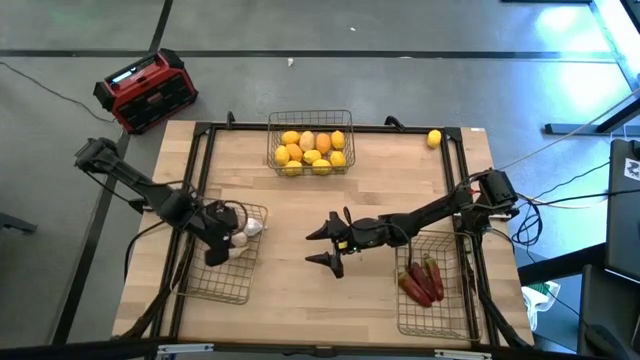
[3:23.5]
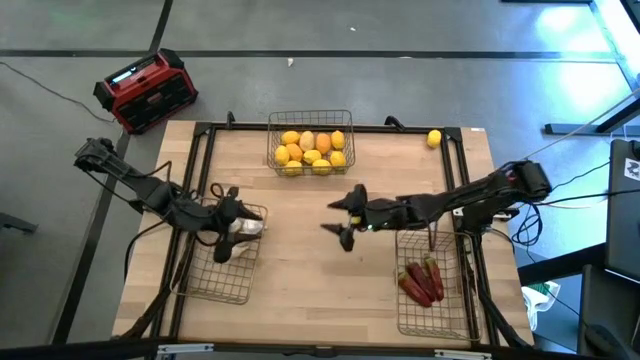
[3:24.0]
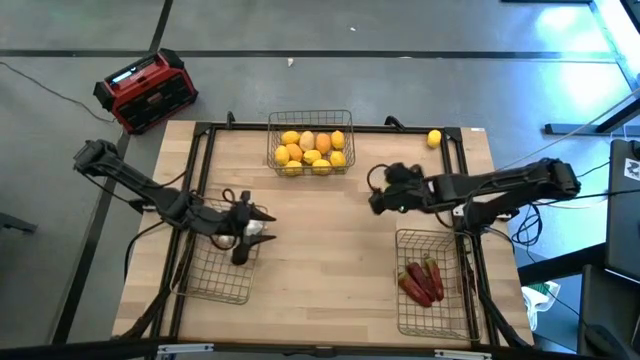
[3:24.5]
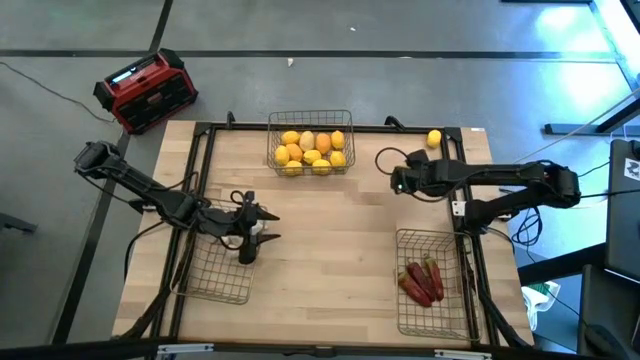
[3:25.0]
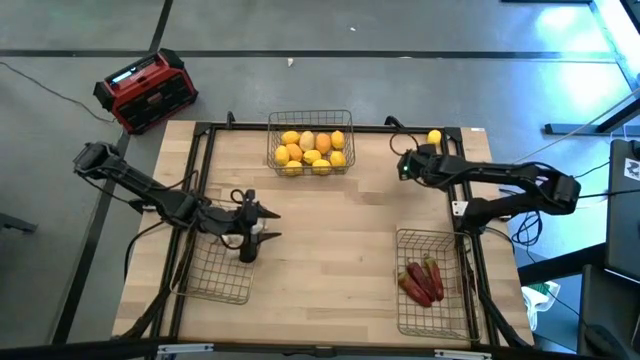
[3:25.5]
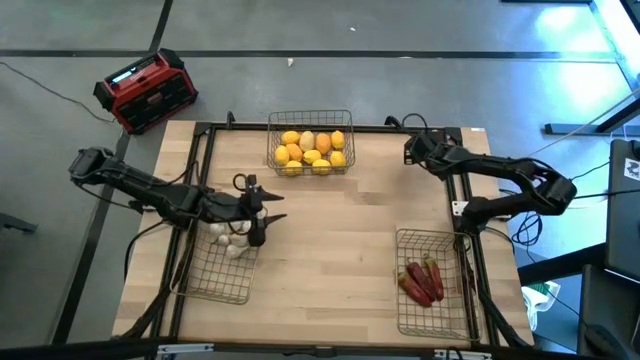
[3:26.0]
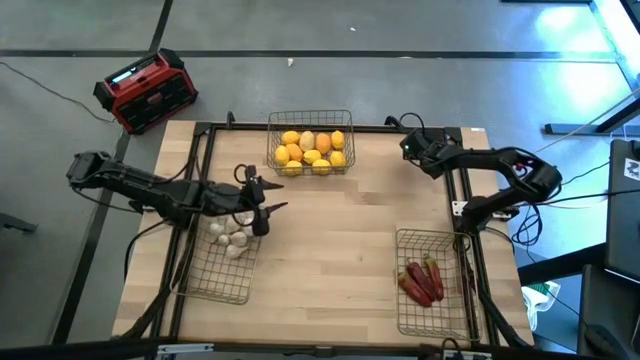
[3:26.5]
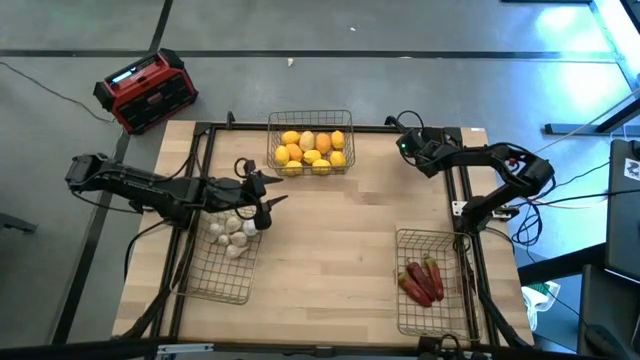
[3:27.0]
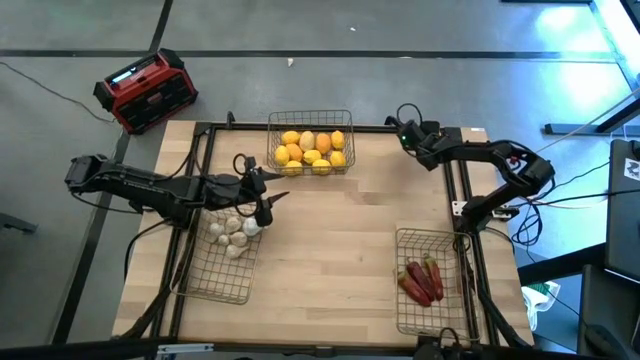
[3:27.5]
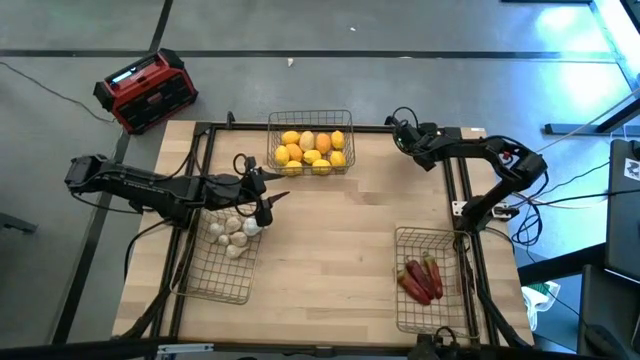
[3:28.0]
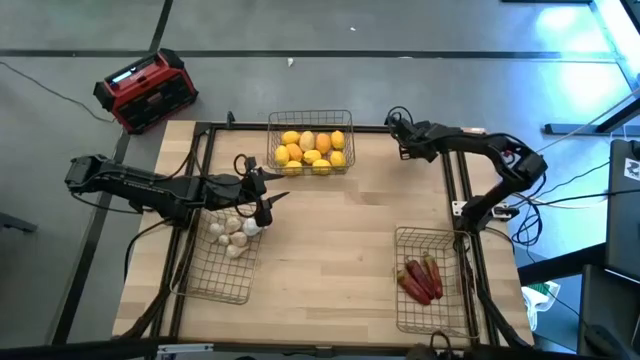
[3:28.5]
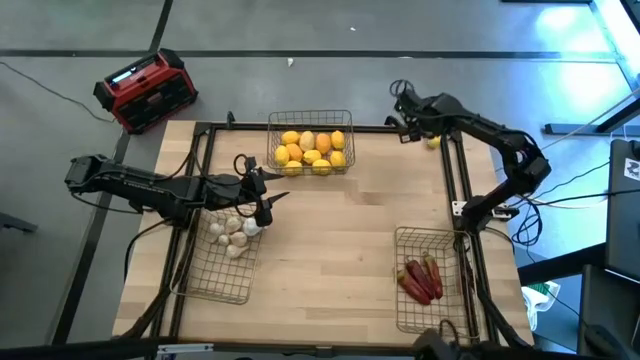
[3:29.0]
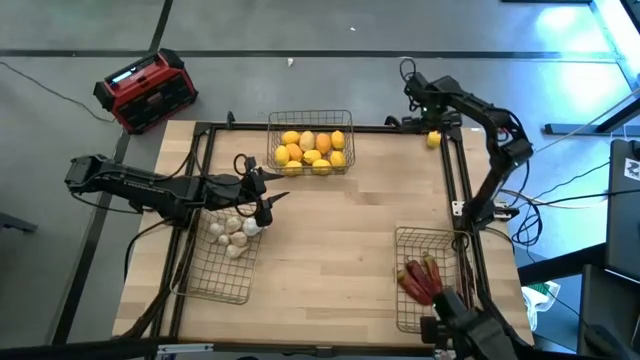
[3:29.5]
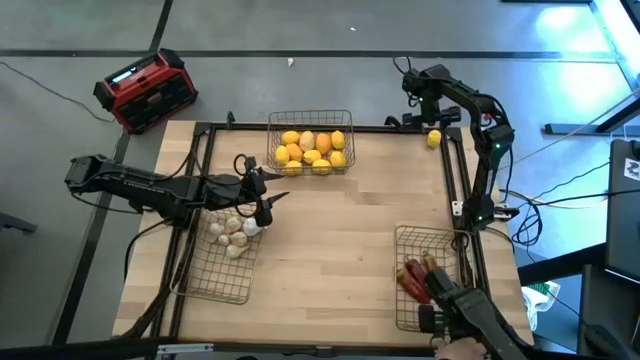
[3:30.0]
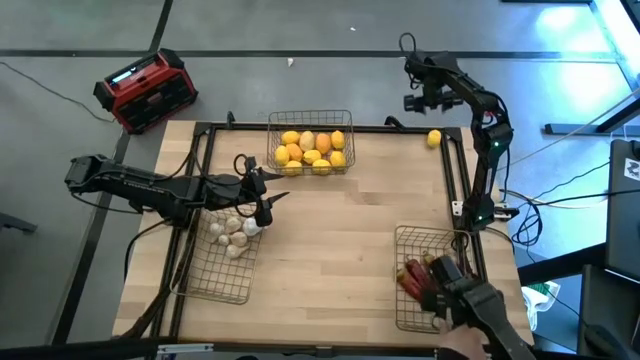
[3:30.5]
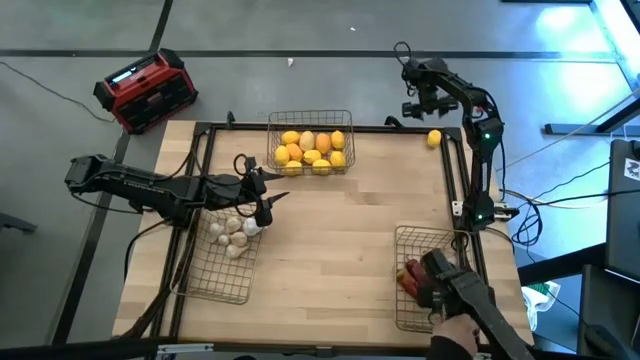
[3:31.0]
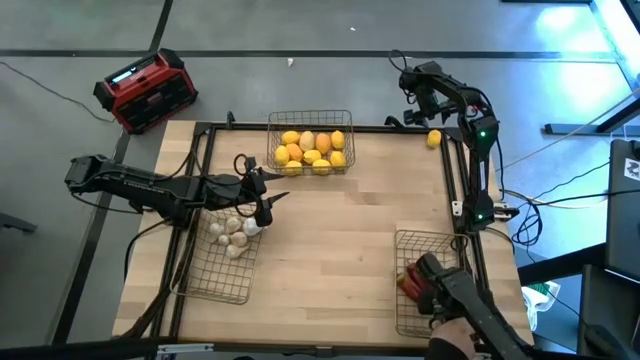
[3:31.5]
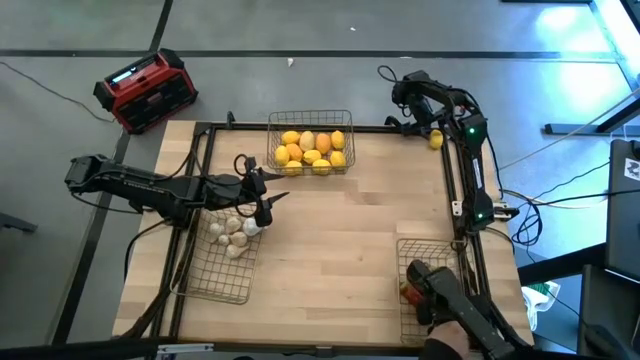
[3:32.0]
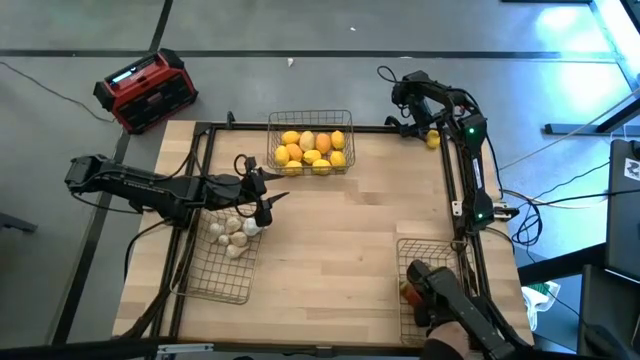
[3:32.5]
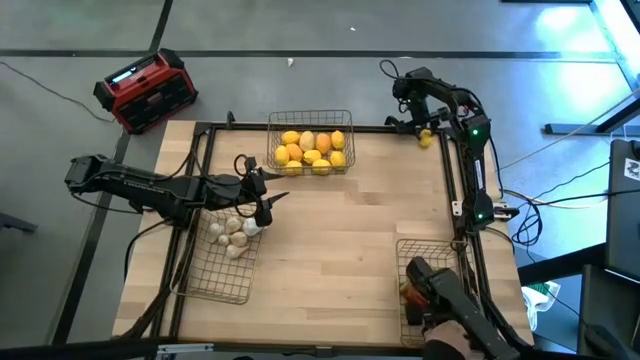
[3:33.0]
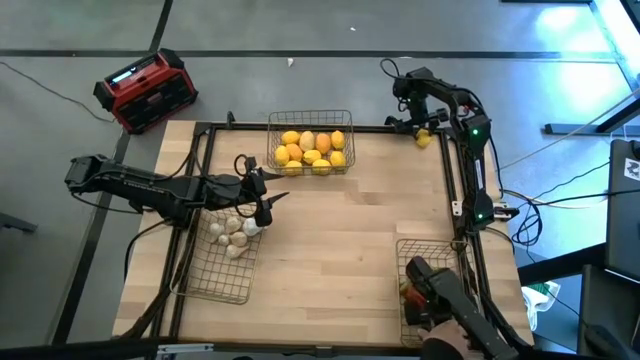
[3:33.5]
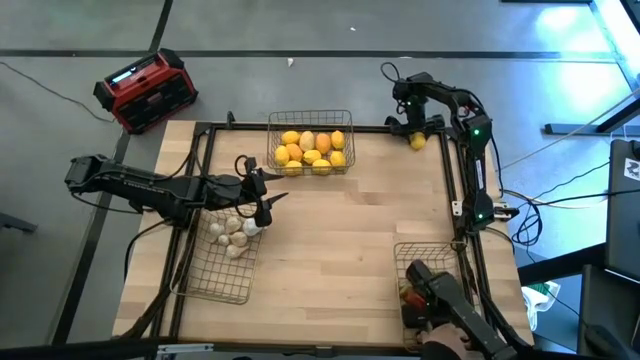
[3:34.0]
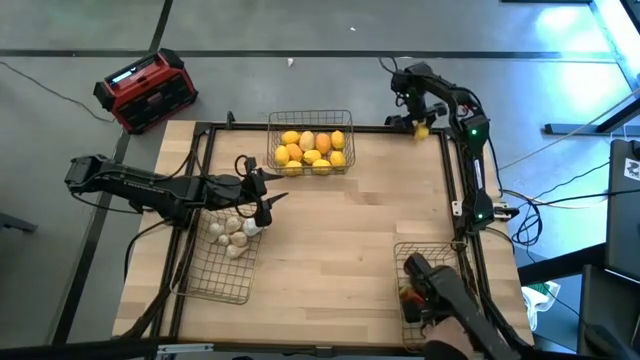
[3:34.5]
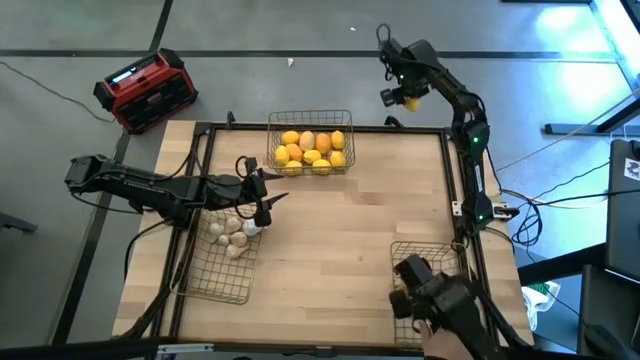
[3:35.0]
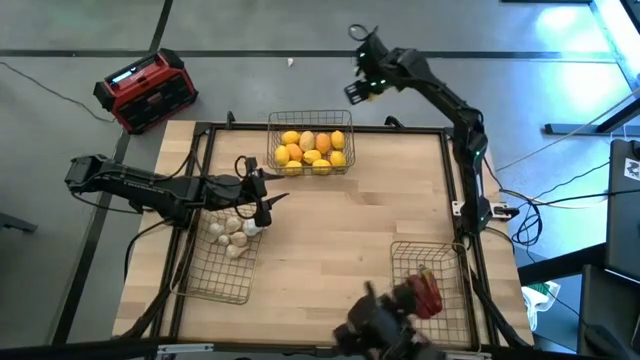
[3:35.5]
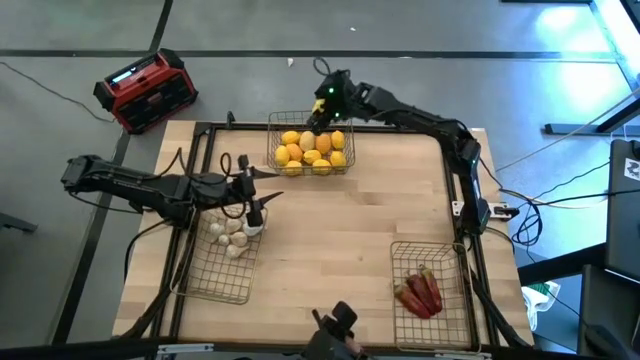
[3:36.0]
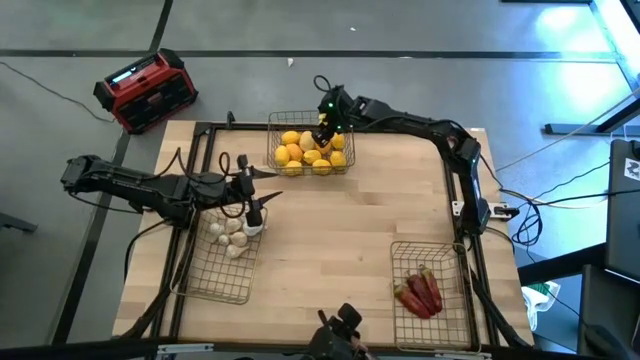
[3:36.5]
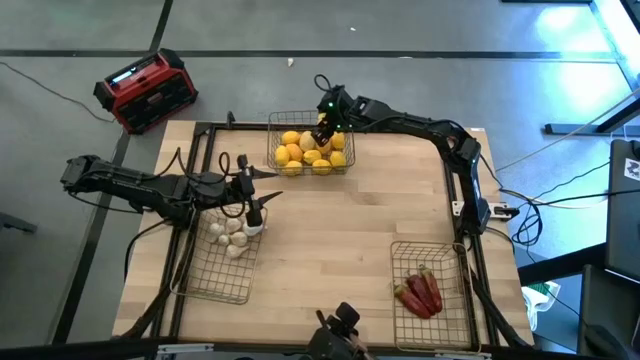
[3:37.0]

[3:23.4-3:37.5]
Task: Sort produce into baskets
Put the lemon into the top wire basket

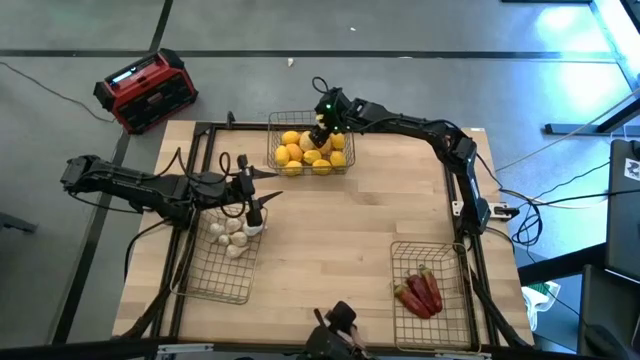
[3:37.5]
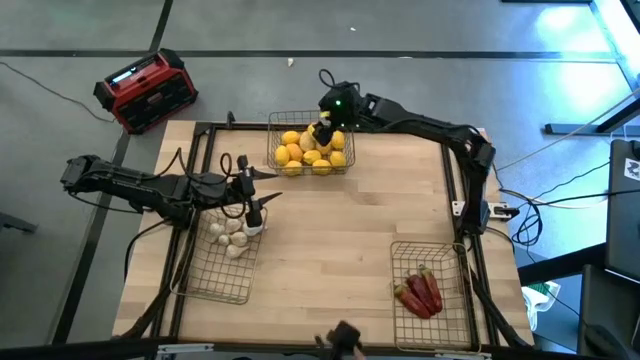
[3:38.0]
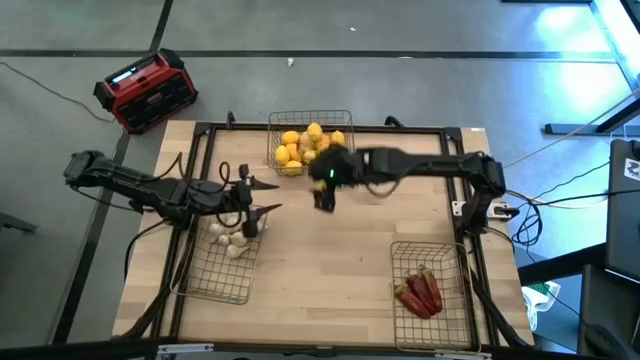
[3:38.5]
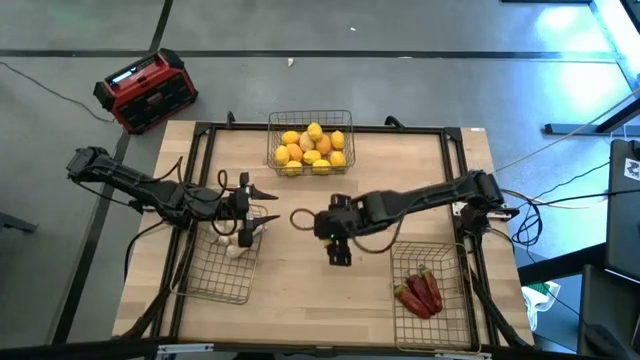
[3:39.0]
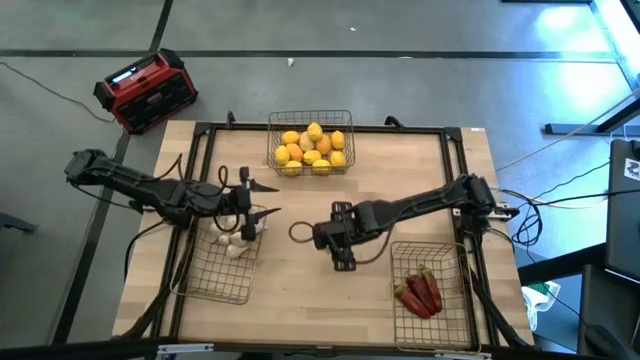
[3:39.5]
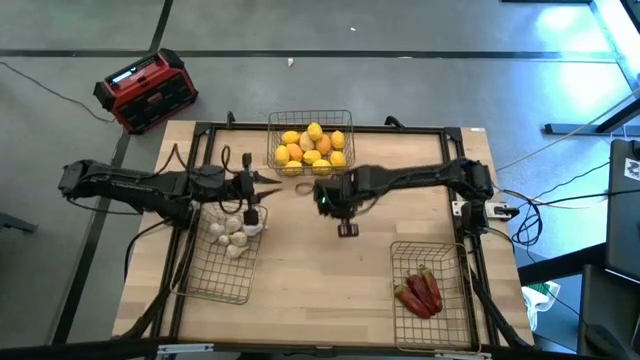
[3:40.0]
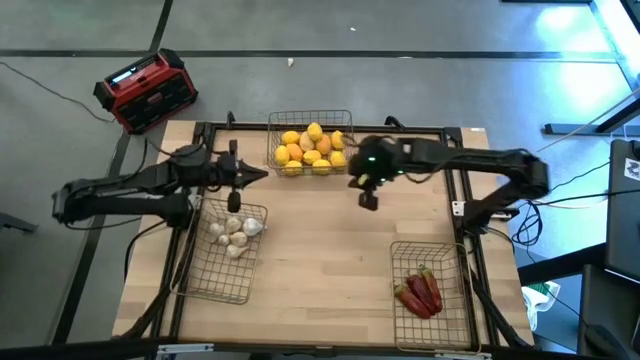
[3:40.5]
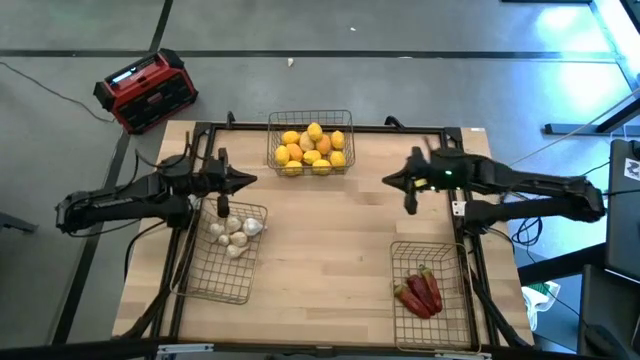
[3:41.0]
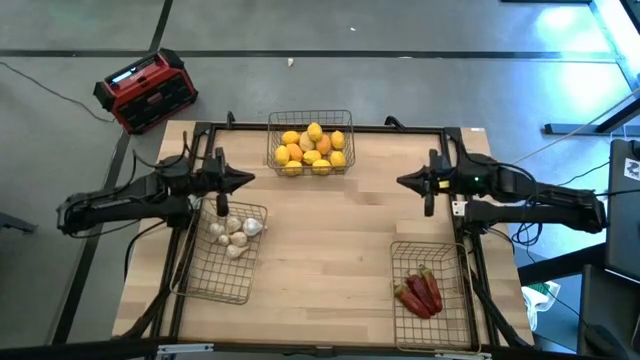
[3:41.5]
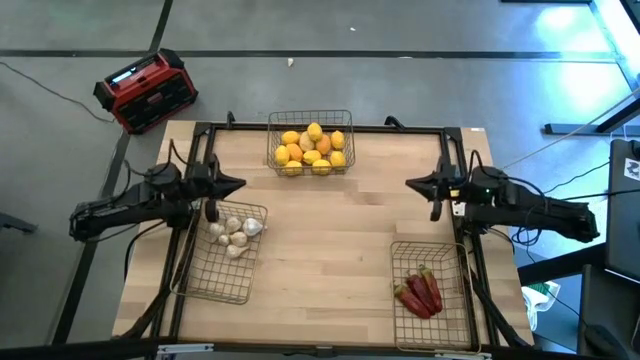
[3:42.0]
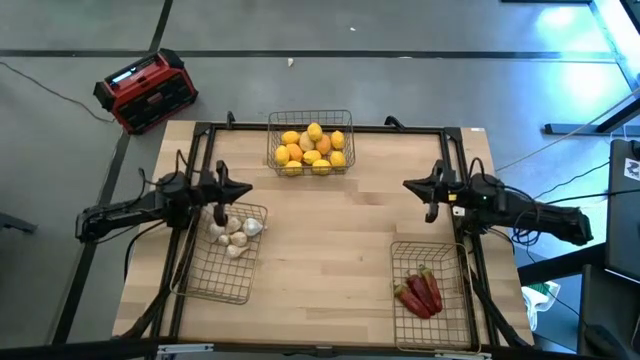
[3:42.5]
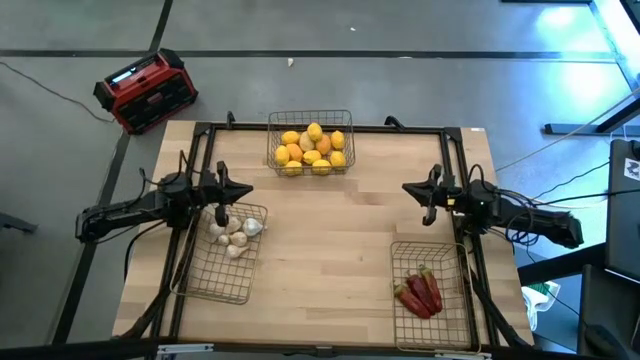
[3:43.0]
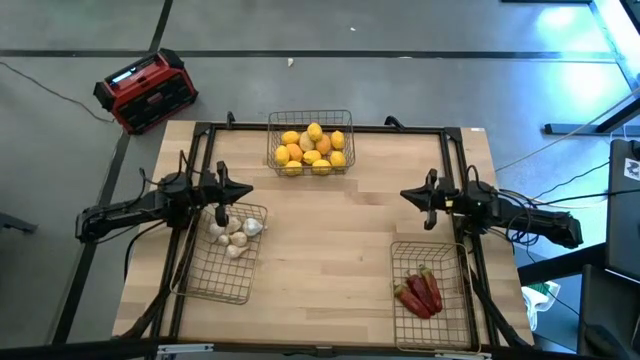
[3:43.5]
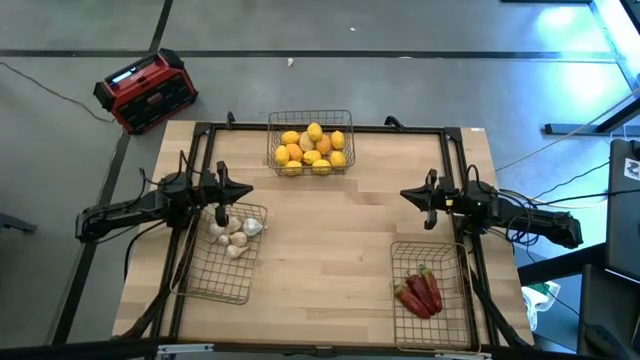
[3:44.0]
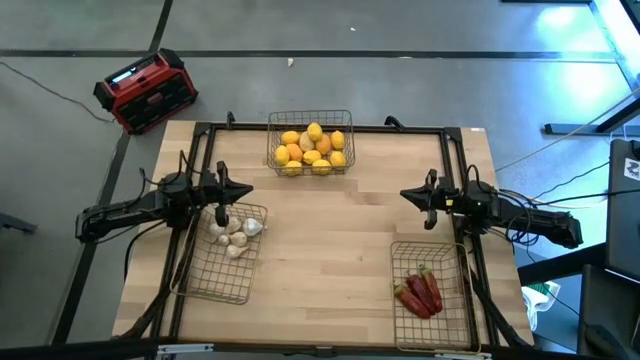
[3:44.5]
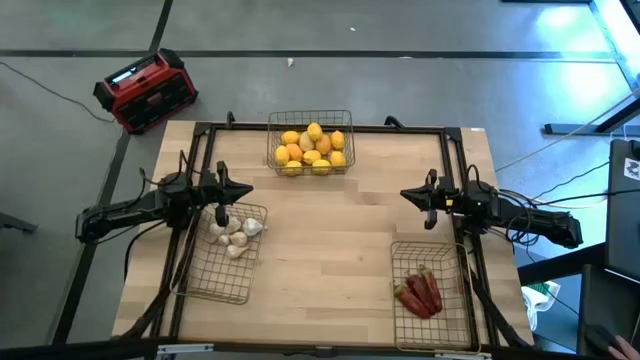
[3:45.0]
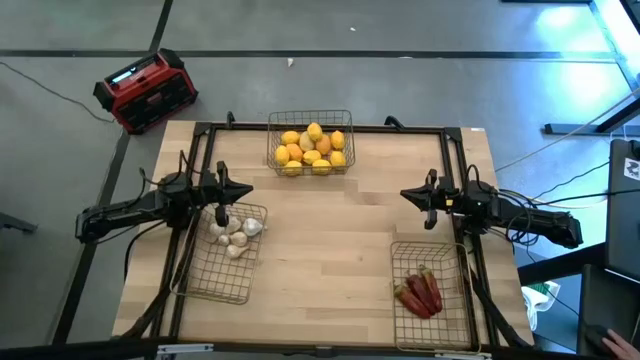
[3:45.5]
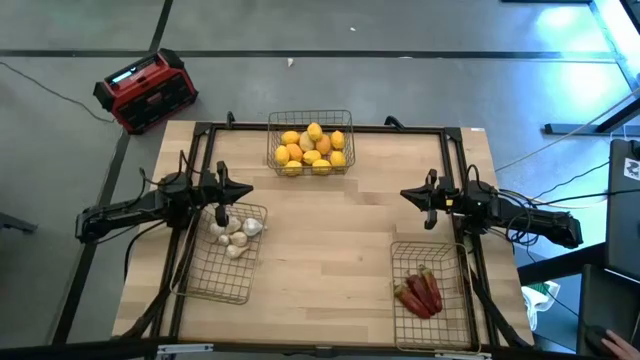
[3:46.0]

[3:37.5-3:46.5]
Return to Home Position
